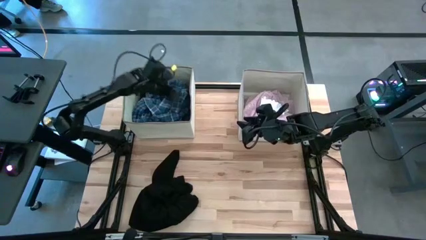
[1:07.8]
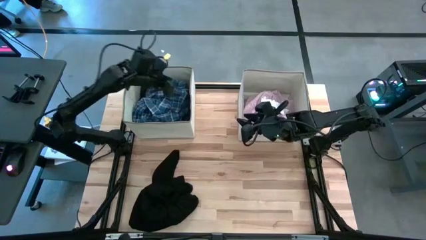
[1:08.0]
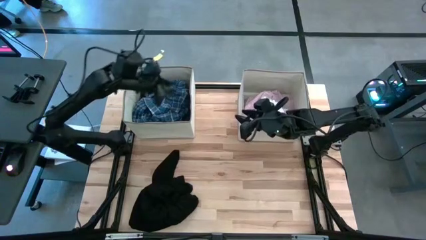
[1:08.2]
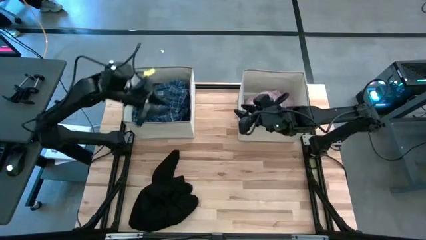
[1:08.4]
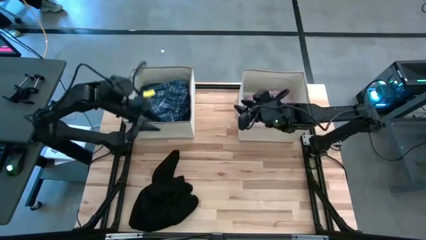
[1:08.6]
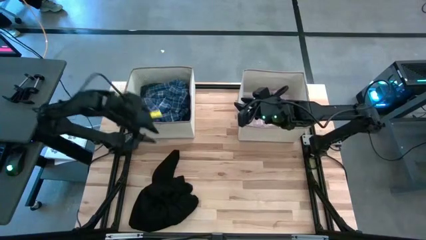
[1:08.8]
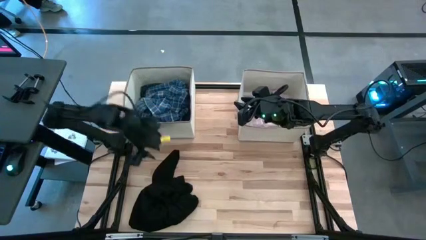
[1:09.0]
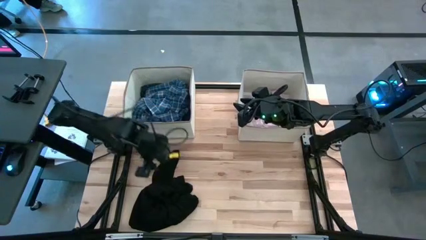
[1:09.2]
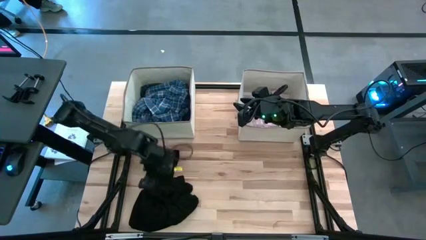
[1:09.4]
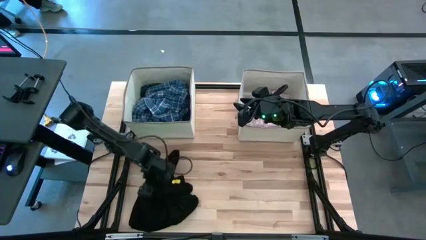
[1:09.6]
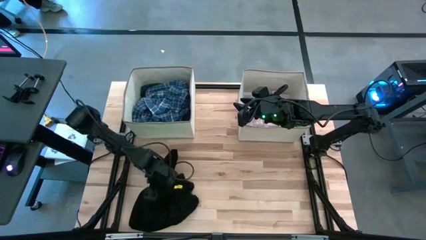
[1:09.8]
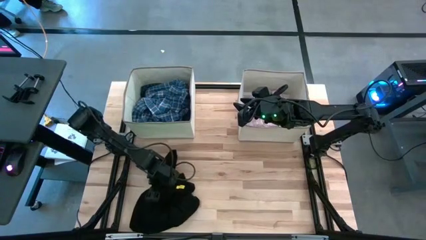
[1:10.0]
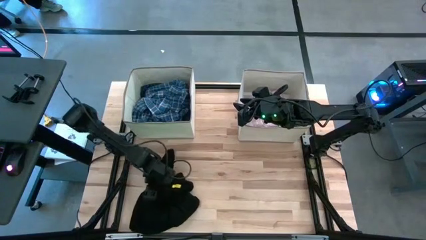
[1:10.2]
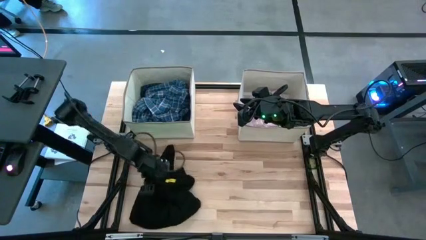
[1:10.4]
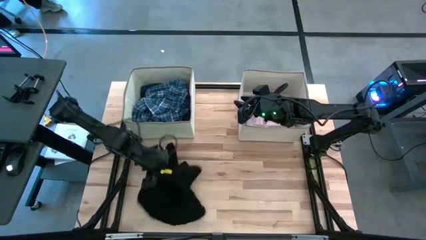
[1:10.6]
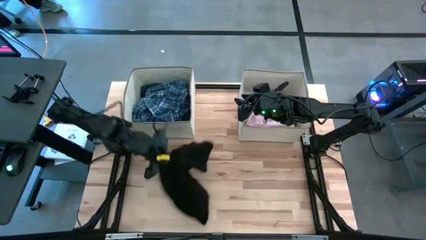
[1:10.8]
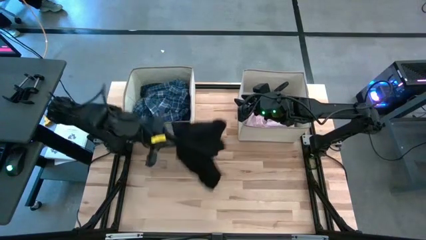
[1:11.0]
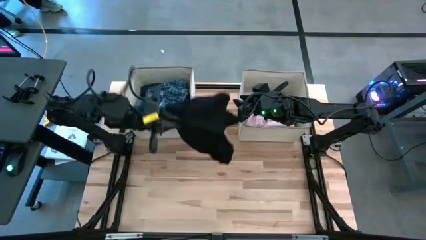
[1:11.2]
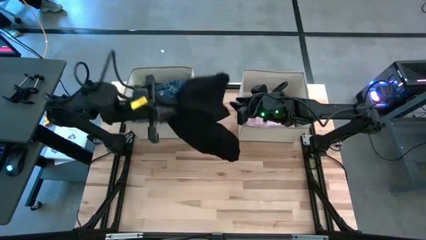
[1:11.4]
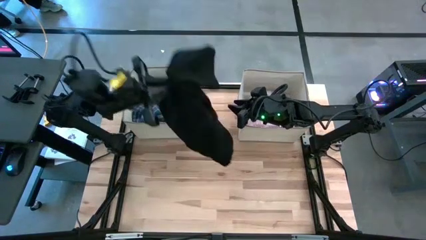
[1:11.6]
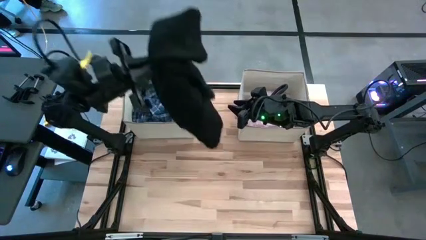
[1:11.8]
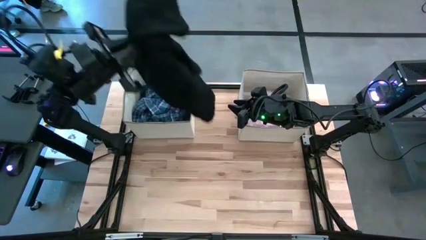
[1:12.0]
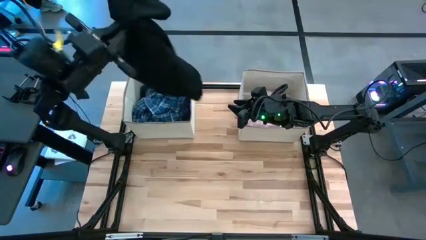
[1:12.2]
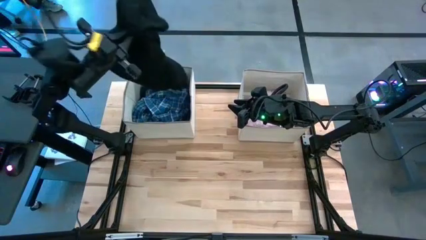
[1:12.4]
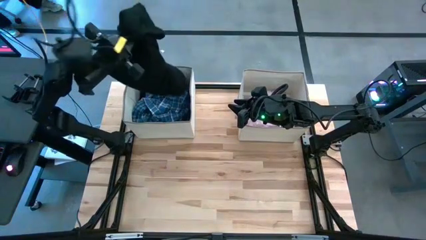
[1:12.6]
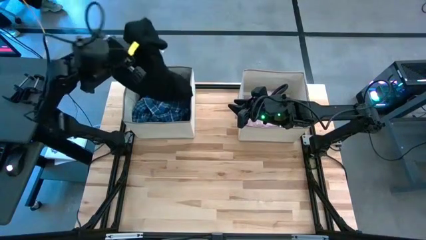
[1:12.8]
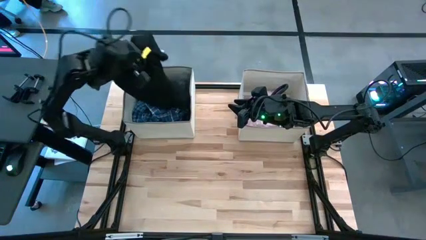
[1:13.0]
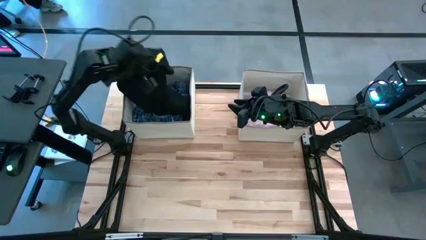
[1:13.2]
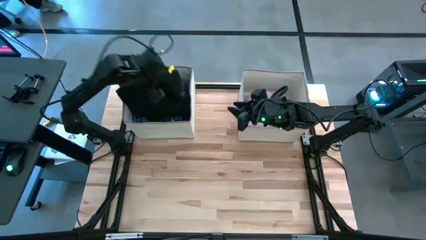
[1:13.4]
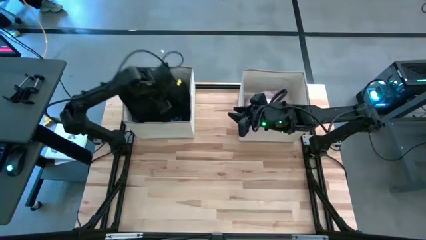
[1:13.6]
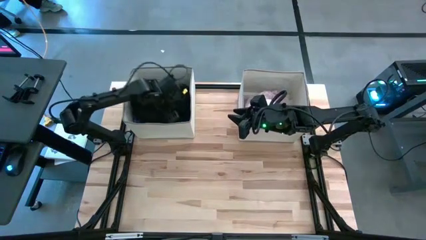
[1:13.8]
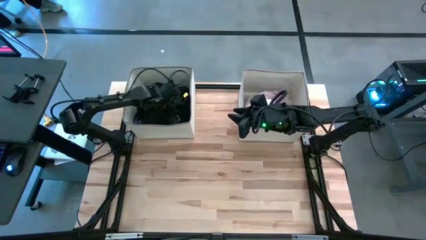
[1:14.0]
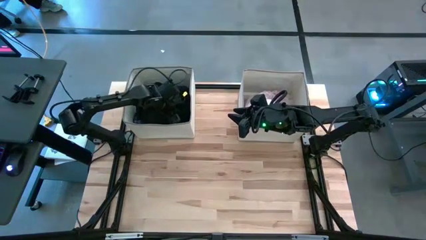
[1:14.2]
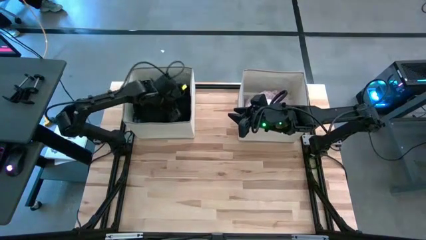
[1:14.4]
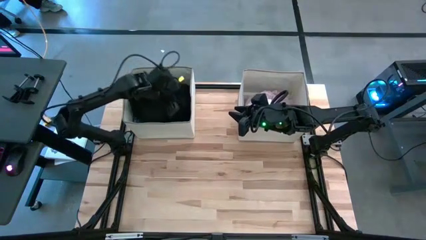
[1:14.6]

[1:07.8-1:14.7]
Task: Sort clothes
Put the black jacket into the left laundry bin

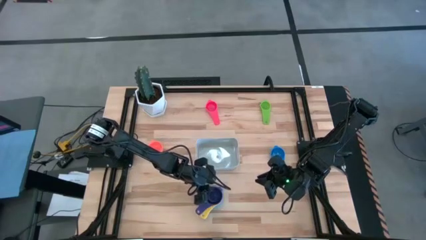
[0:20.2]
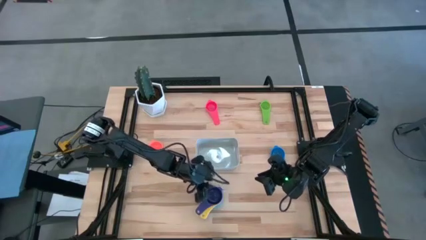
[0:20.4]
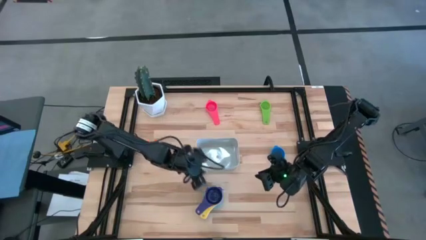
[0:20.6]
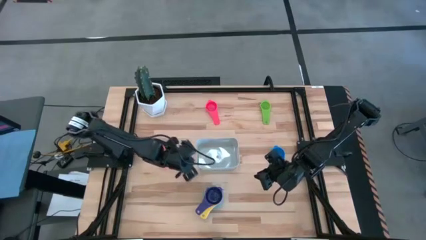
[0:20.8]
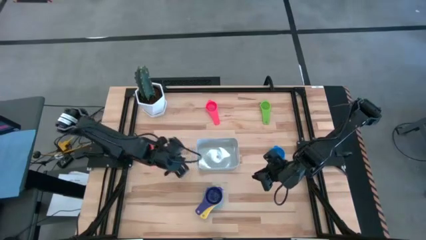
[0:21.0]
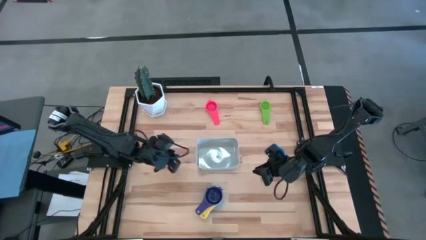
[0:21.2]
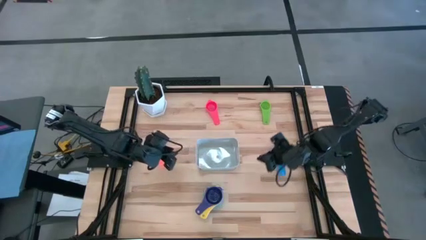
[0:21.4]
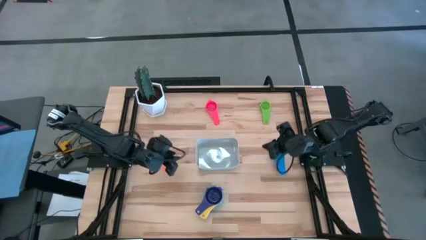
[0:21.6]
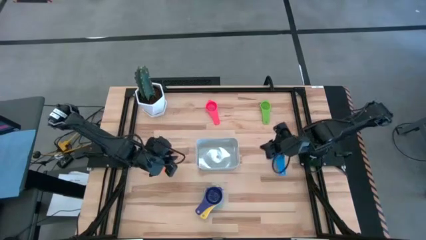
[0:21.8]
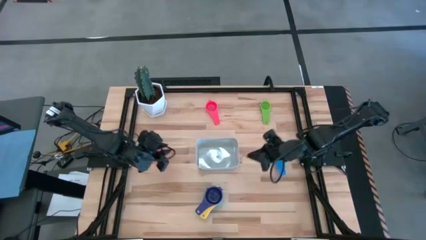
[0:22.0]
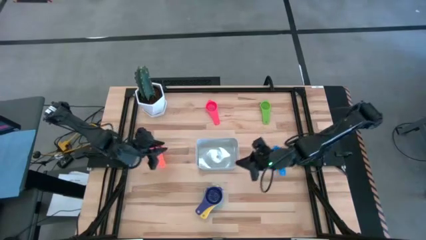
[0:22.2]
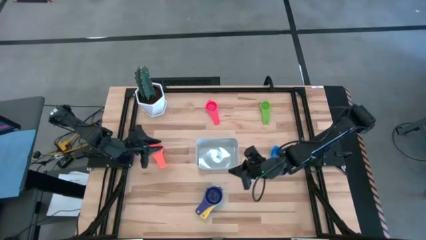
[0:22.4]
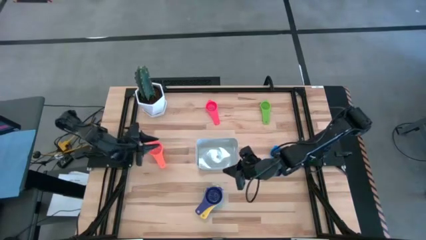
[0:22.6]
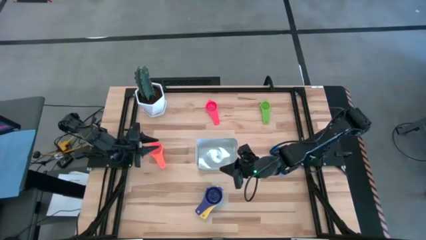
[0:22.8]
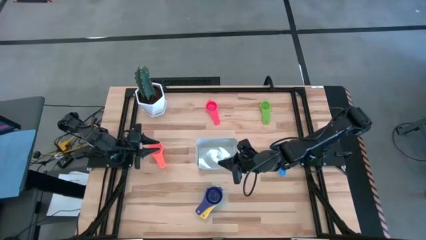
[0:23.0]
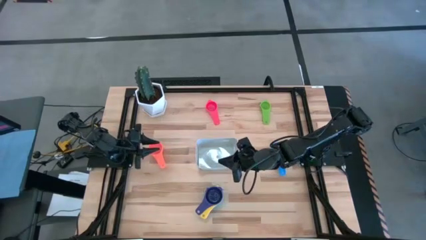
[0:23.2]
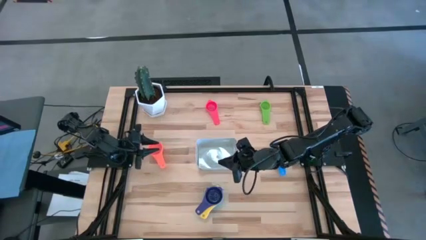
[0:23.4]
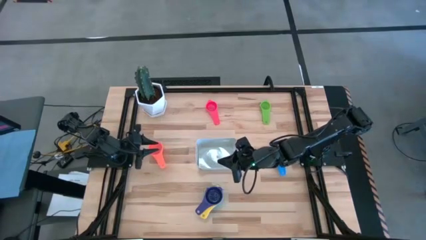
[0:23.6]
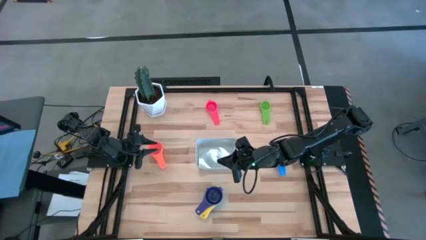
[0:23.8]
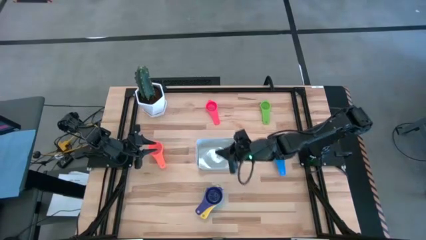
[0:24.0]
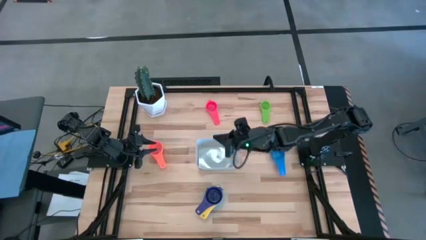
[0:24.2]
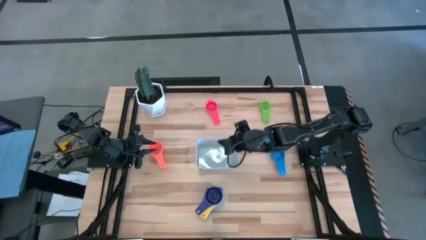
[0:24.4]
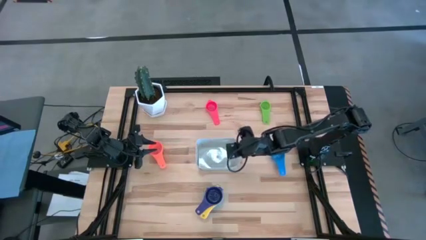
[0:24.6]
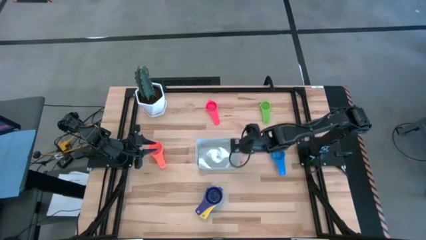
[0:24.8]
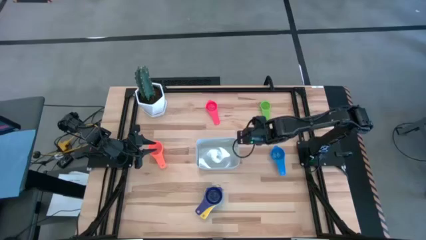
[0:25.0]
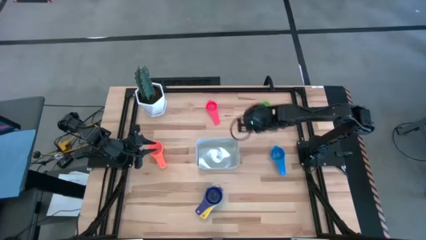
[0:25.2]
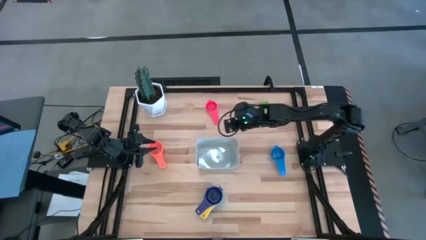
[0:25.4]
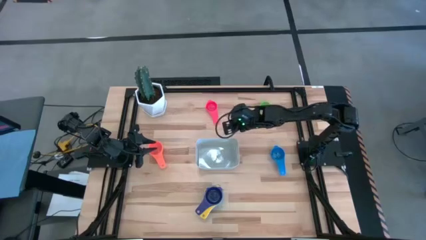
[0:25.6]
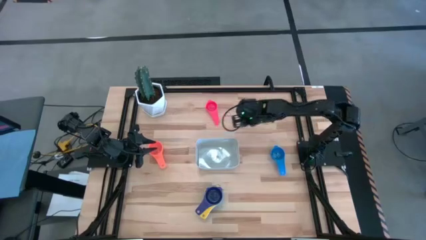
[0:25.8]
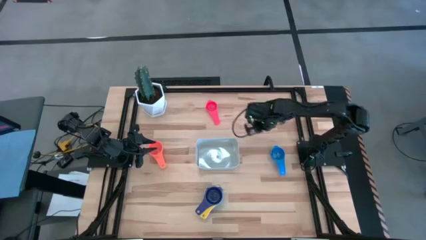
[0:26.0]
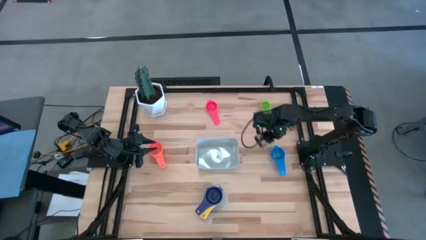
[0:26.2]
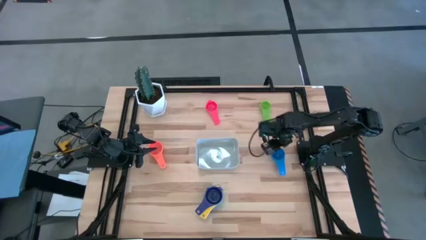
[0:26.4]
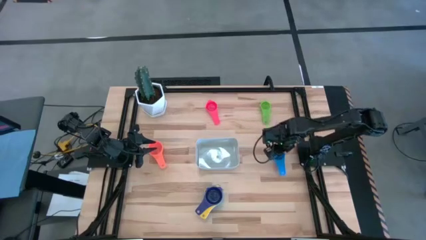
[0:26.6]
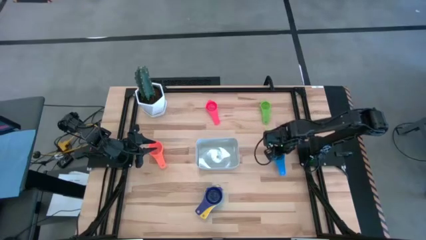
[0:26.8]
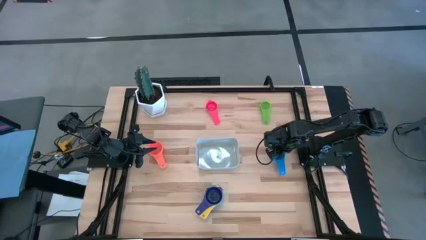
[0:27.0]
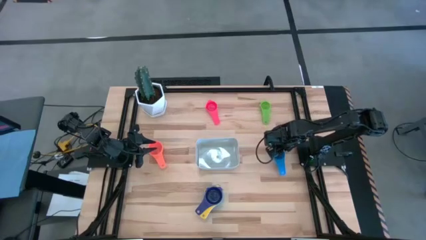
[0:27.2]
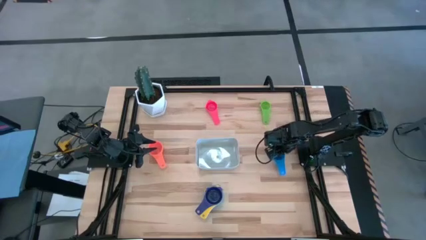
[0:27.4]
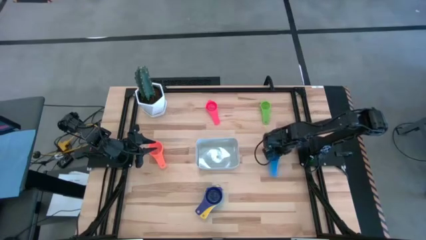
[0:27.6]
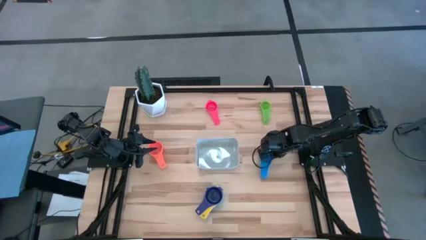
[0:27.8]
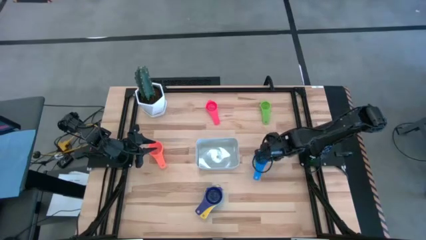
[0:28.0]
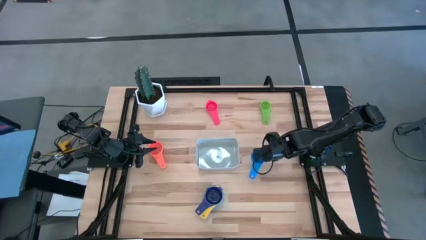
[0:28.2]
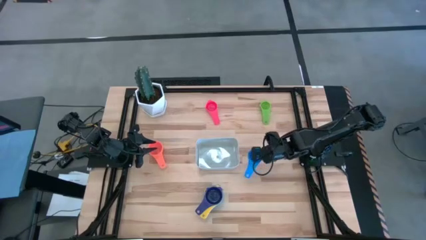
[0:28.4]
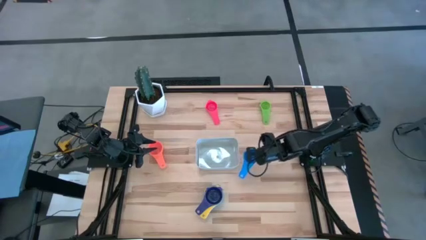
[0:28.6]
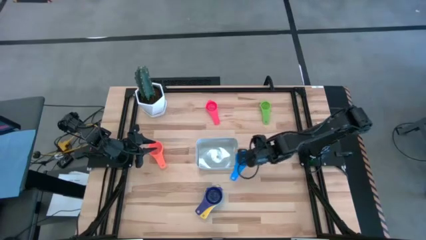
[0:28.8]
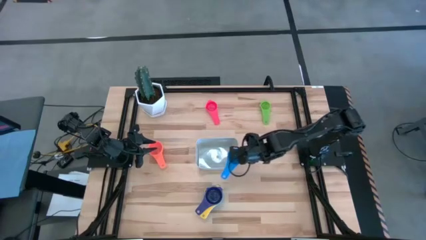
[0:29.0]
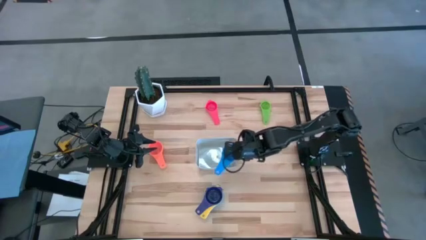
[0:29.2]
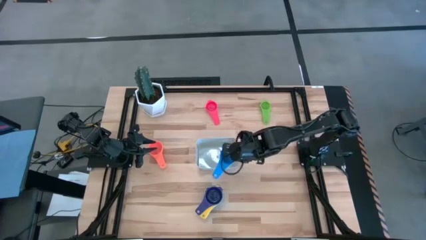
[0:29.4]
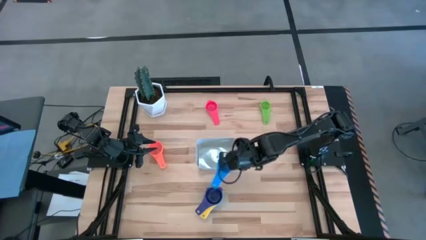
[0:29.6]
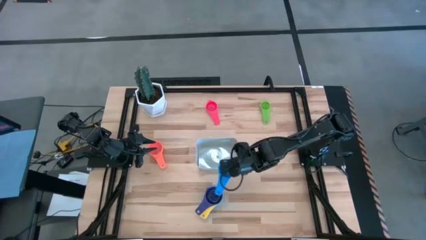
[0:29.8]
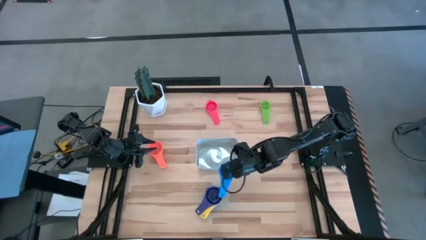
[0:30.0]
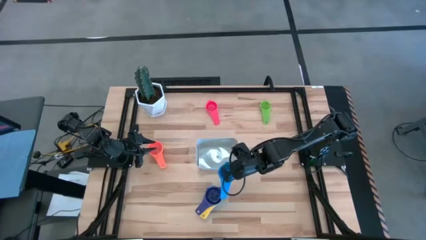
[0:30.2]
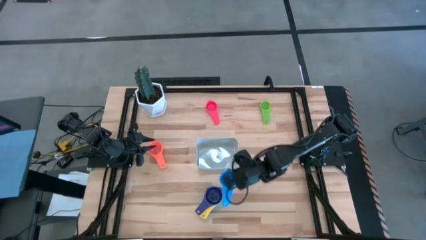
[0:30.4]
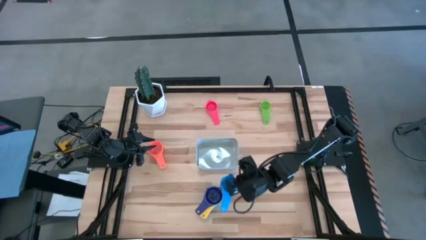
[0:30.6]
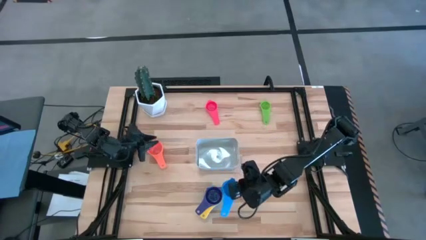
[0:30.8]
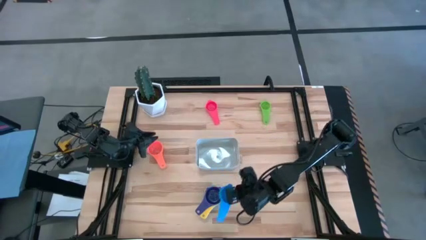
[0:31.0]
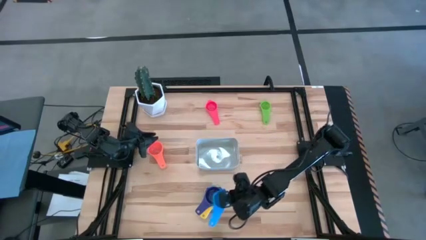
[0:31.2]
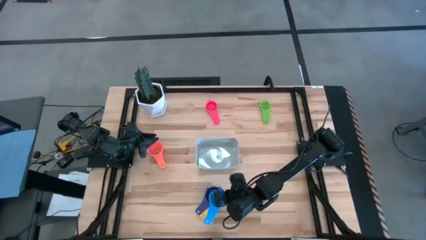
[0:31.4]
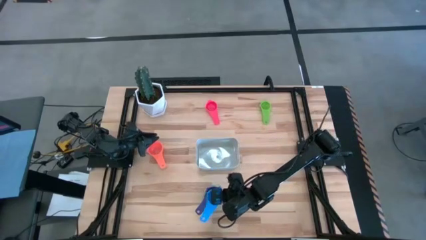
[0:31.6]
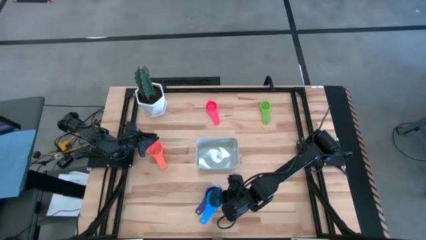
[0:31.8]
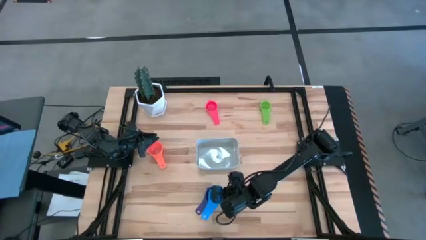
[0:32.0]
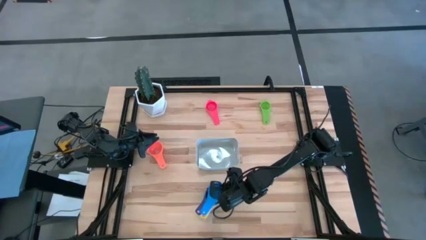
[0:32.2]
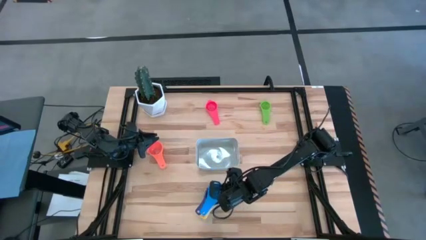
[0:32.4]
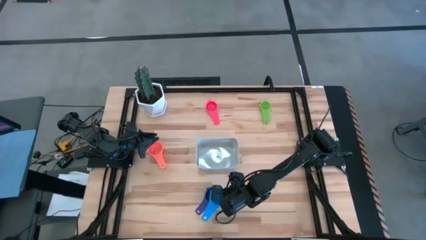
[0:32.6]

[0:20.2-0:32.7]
Task: Nest measuring cups in basket
Stack the blue measuring cup on top of the dark blue measuring cup
